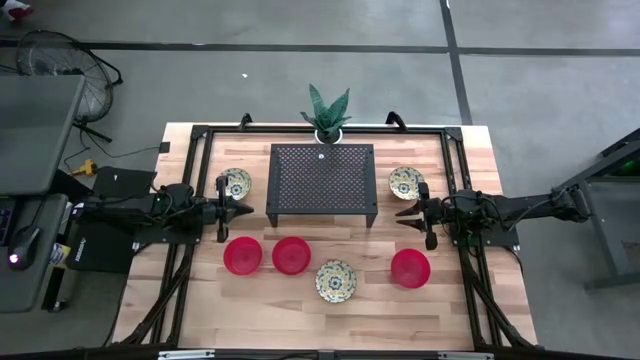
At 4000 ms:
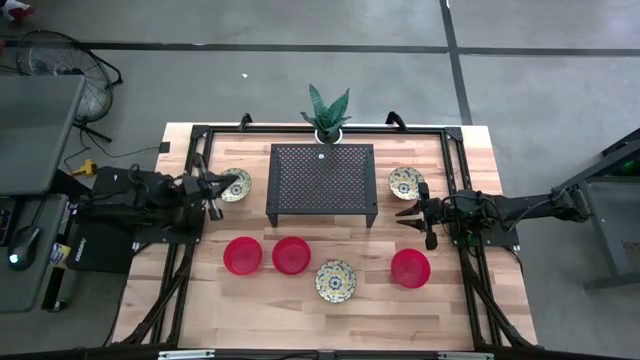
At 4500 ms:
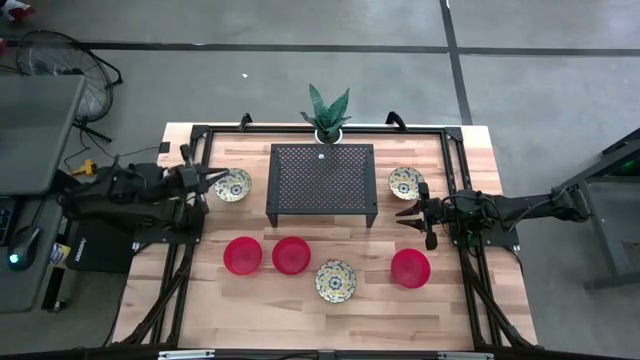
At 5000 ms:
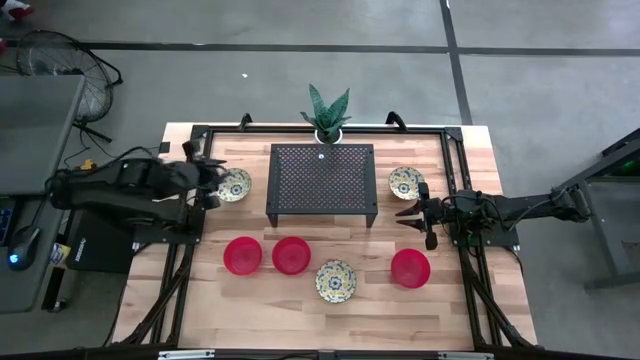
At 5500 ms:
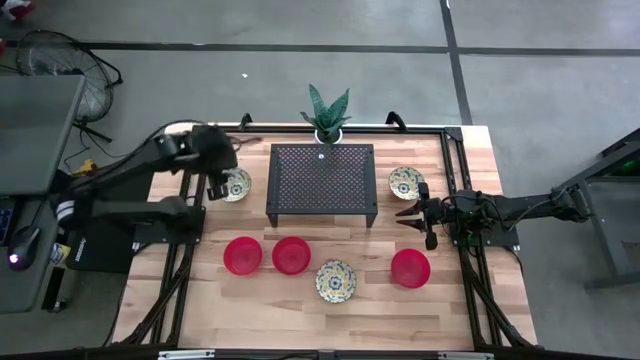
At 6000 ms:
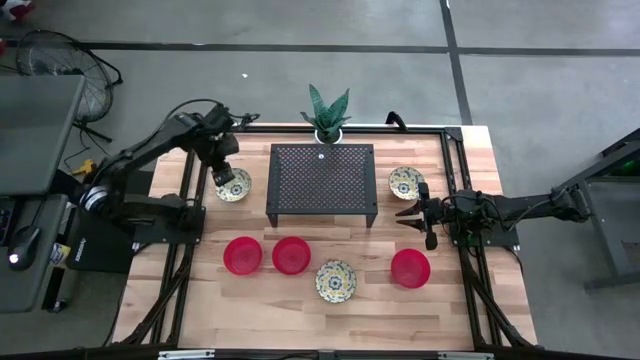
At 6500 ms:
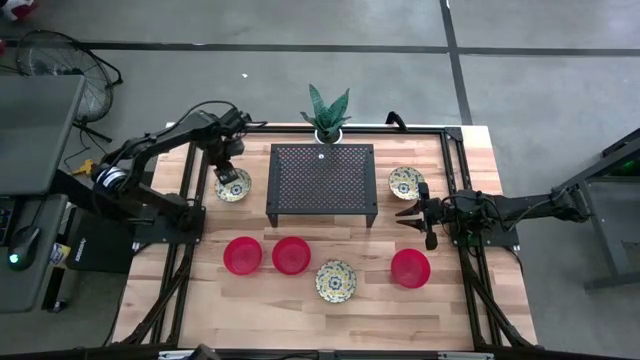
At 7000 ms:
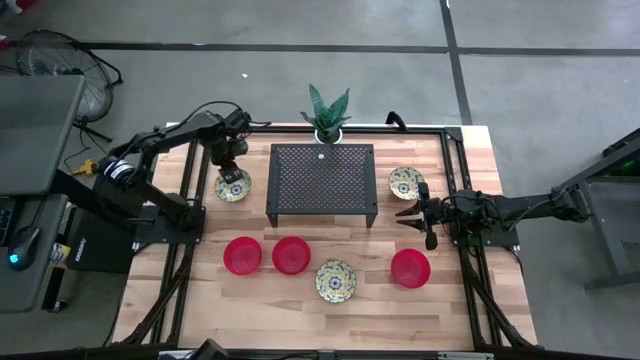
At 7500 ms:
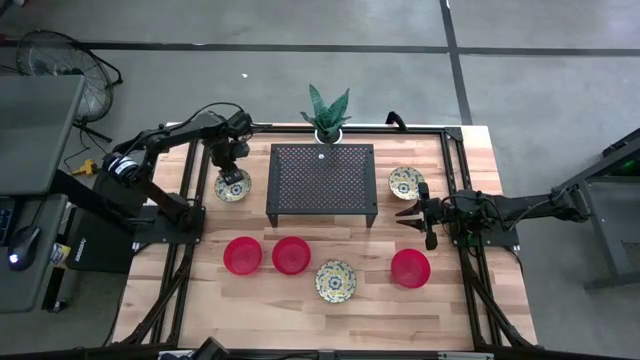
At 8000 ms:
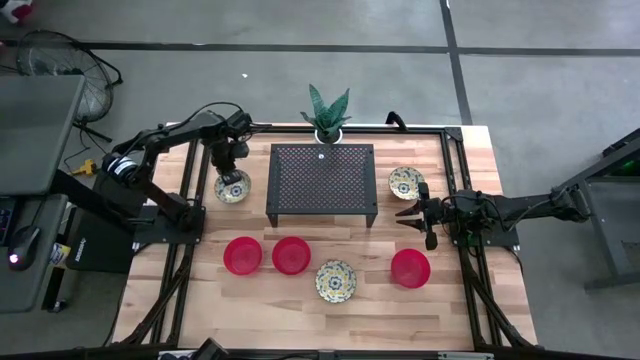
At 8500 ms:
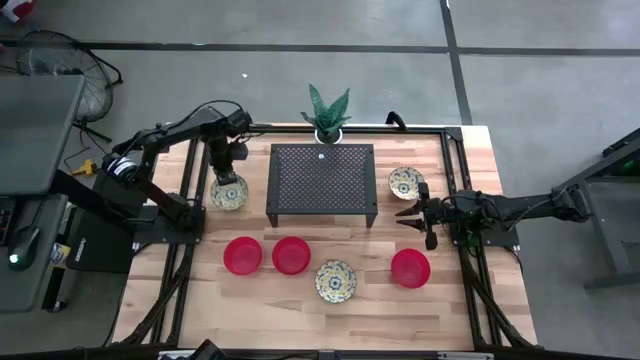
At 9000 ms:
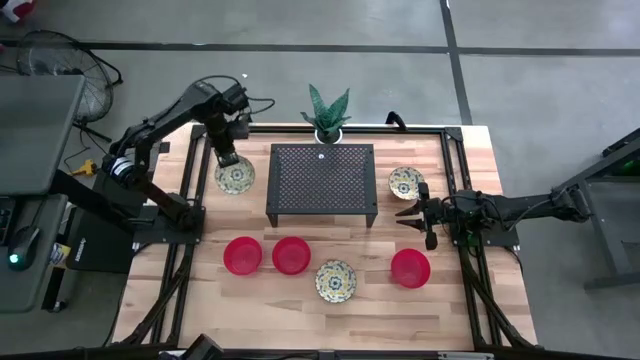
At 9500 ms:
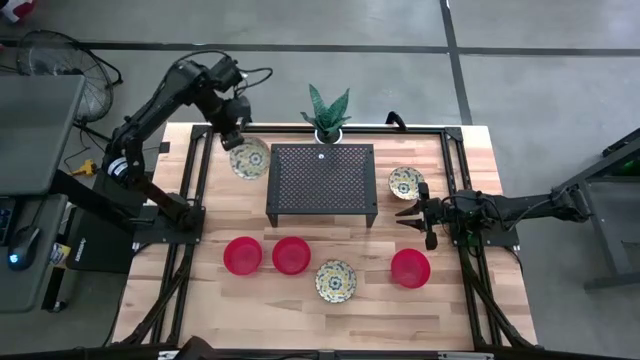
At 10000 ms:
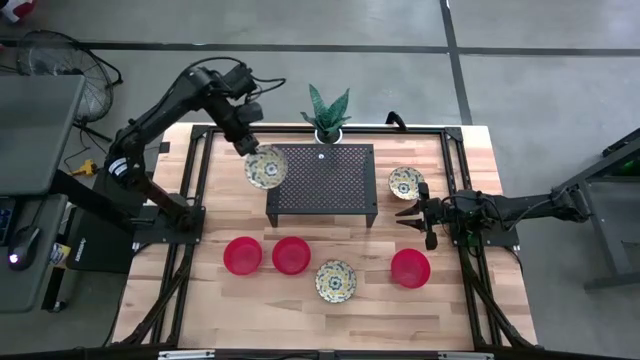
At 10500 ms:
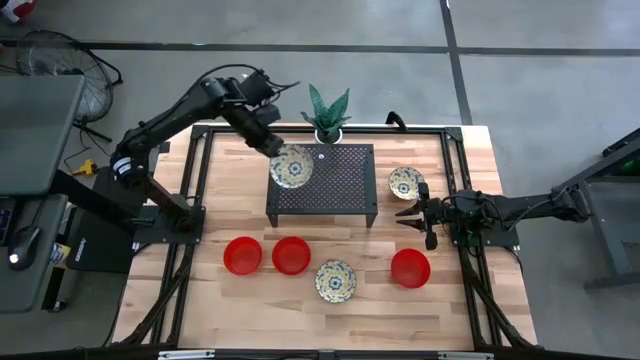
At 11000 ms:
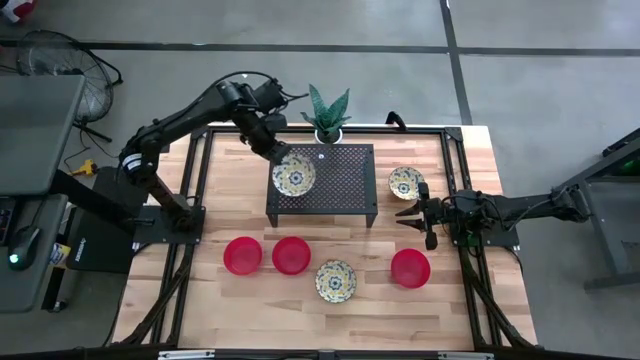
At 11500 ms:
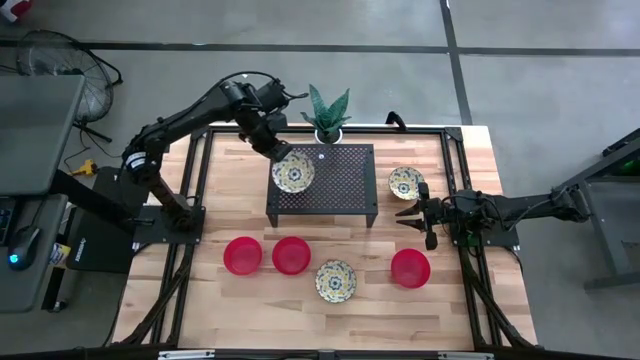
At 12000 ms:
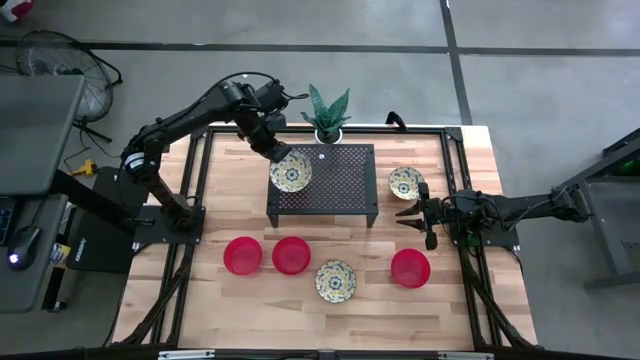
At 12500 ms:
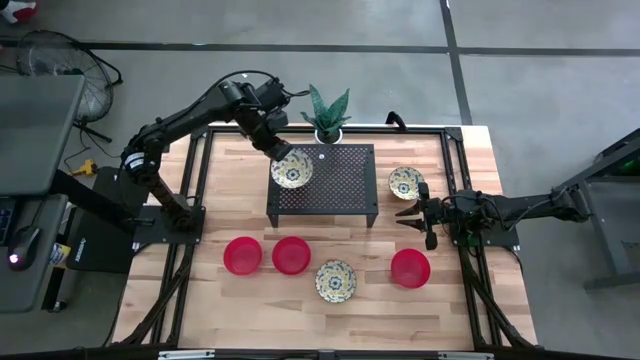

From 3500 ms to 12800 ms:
Task: Pick & Place Mini bowls
Put the top left yellow bowl on the shelf

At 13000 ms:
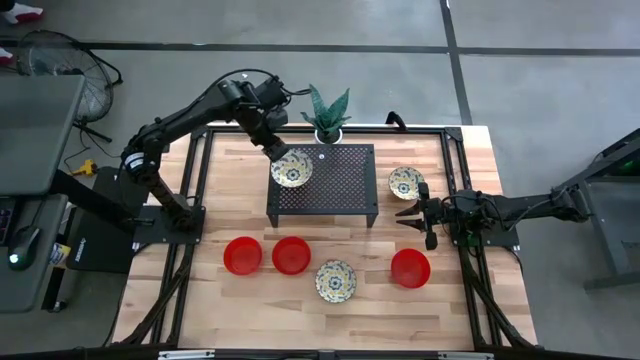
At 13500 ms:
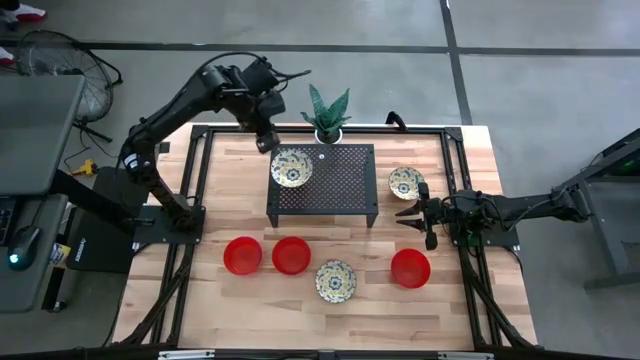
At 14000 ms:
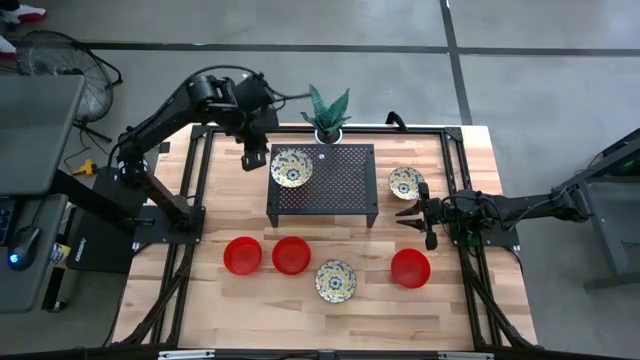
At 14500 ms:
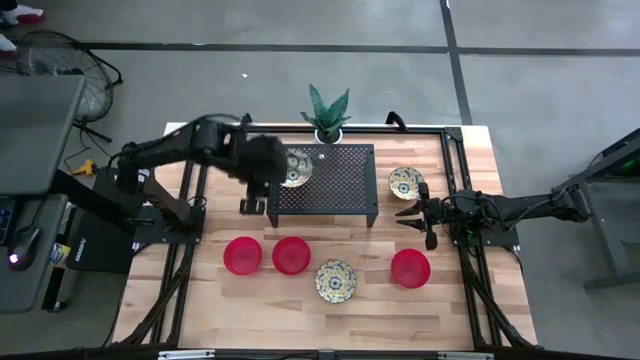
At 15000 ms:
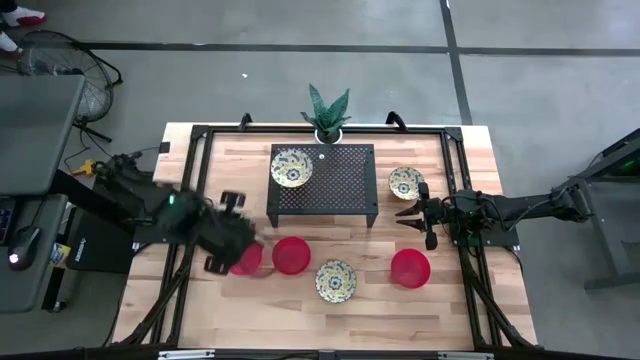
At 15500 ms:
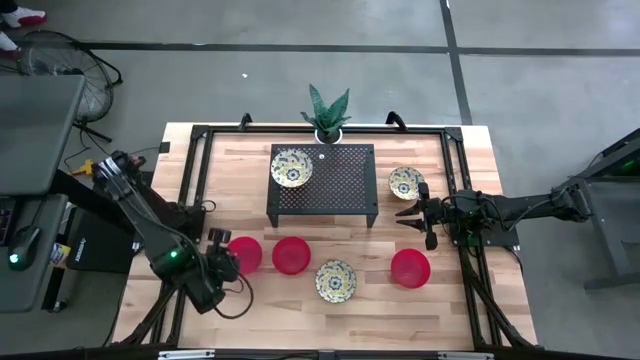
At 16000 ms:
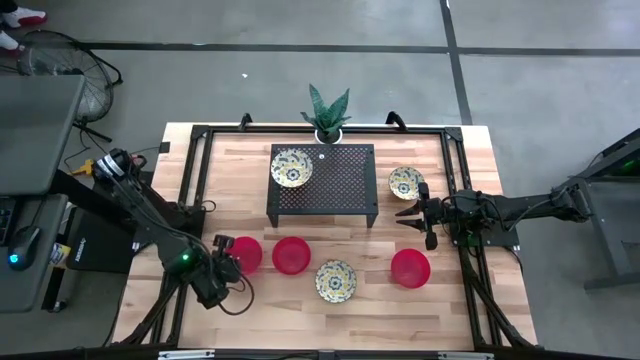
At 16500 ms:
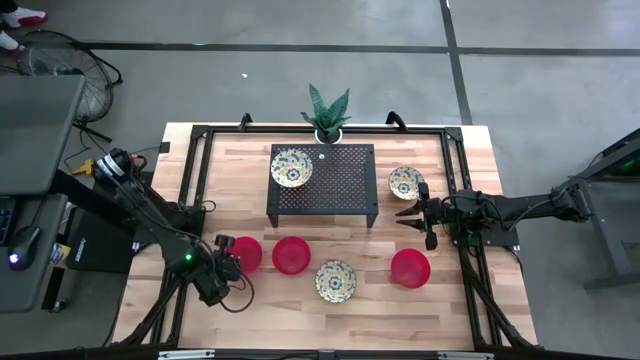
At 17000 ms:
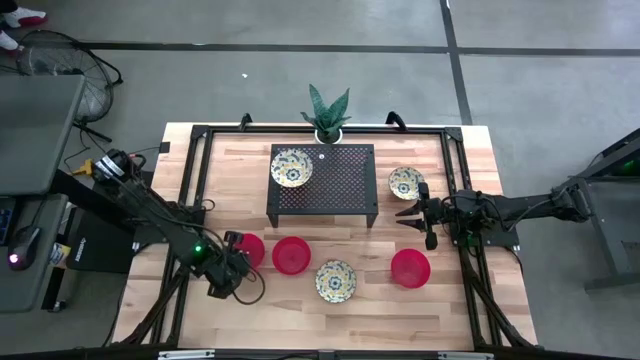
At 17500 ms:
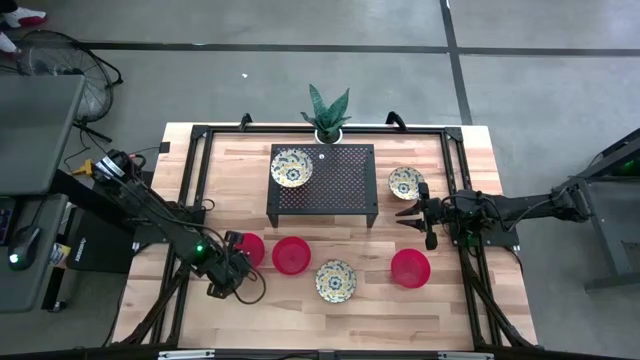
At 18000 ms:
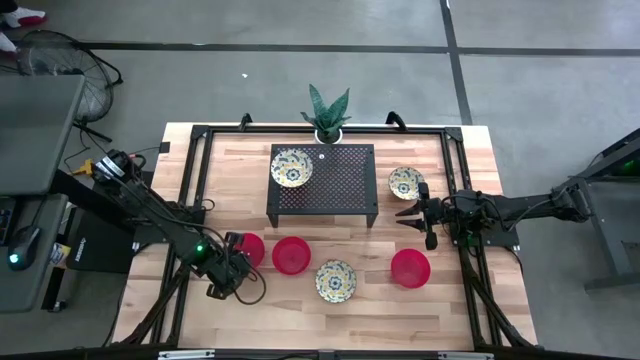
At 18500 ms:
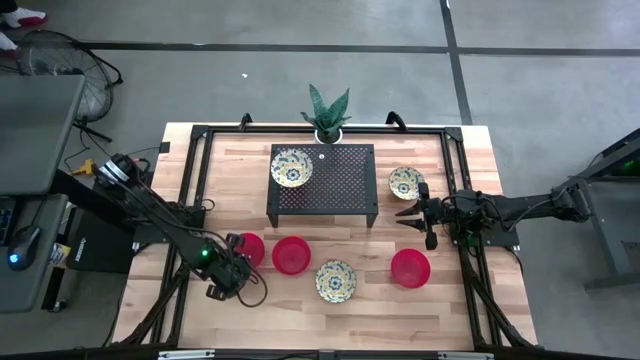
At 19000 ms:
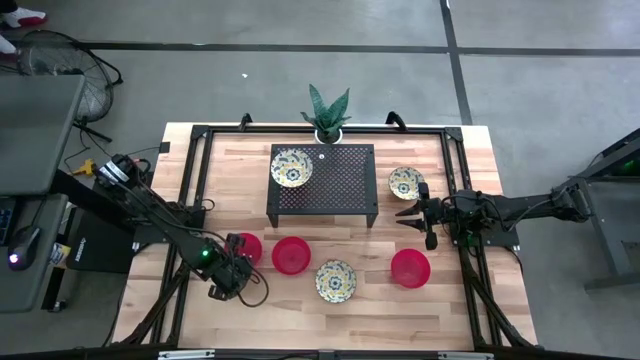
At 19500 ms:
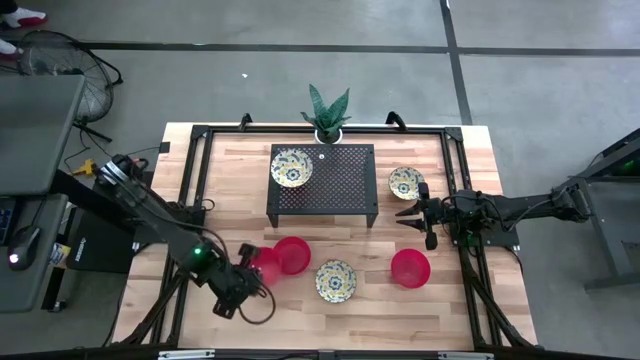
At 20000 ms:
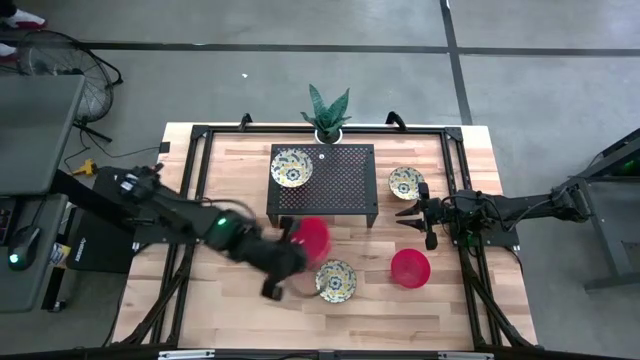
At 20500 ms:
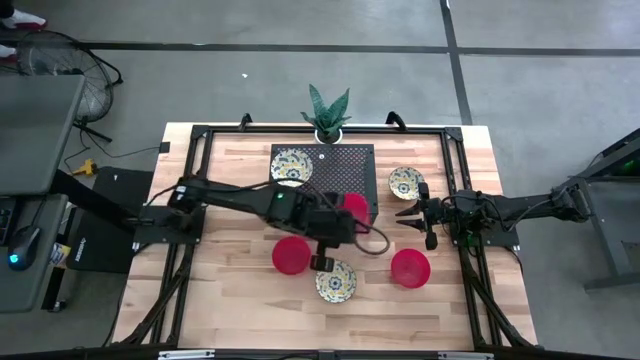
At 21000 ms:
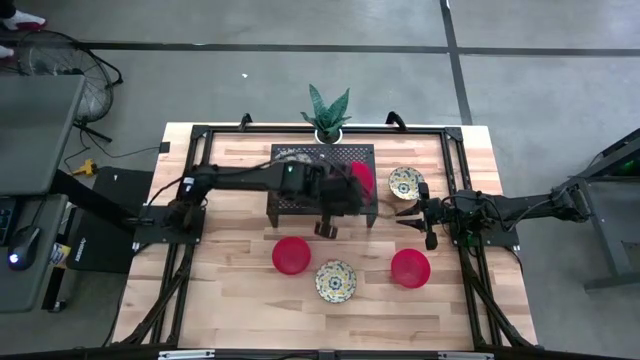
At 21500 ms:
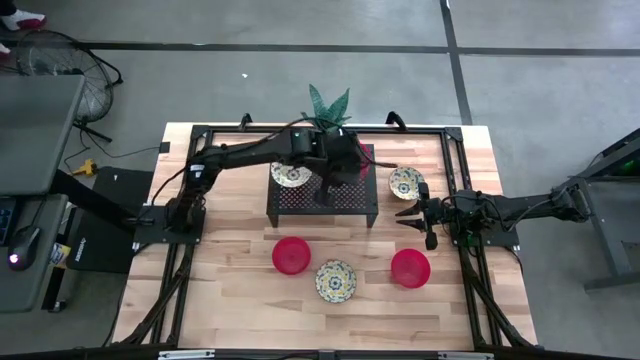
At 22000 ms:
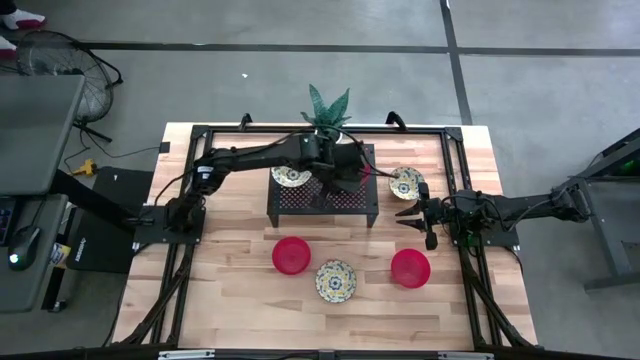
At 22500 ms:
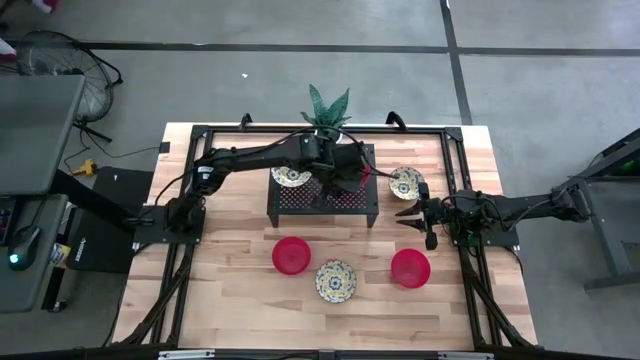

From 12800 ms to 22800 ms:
Put the left red bowl on the shelf

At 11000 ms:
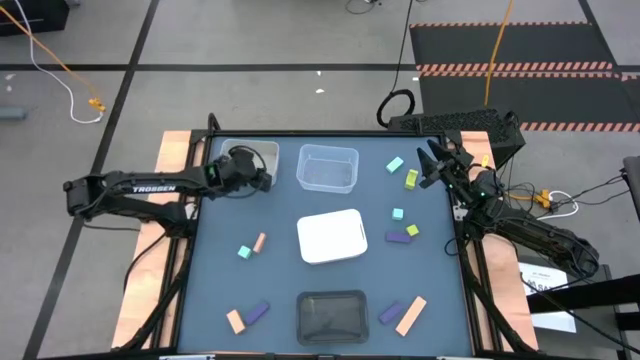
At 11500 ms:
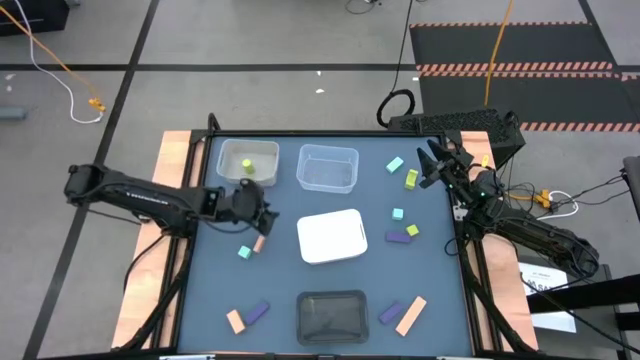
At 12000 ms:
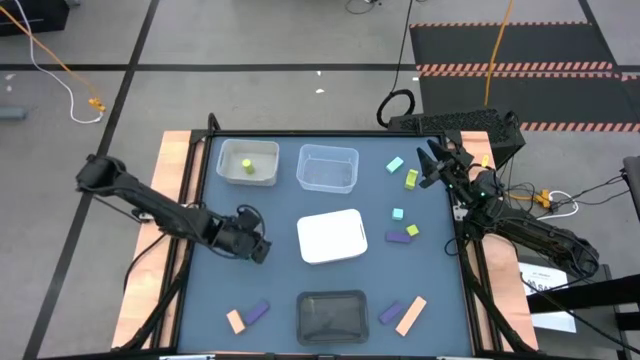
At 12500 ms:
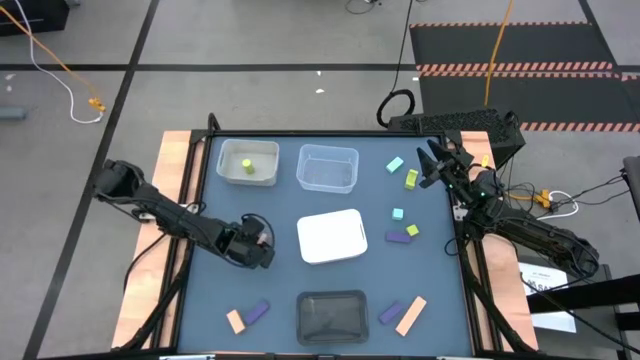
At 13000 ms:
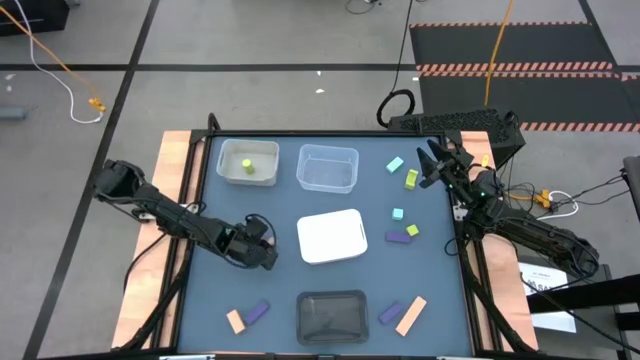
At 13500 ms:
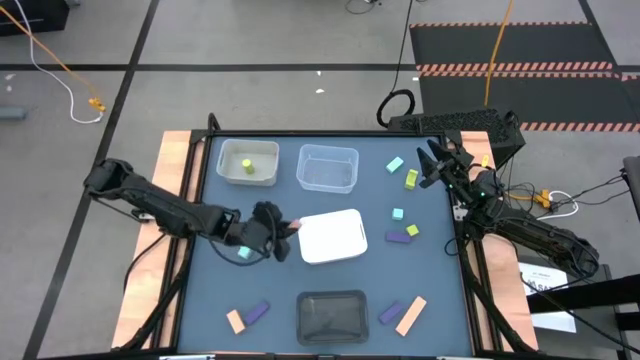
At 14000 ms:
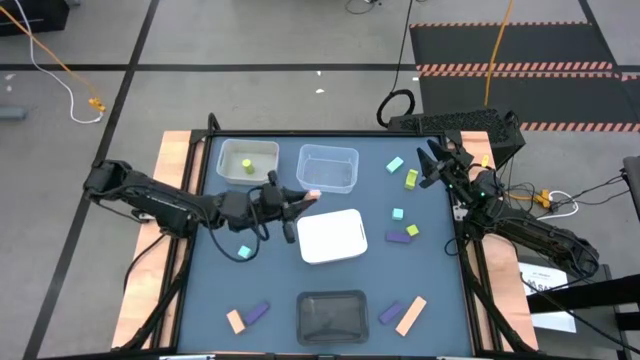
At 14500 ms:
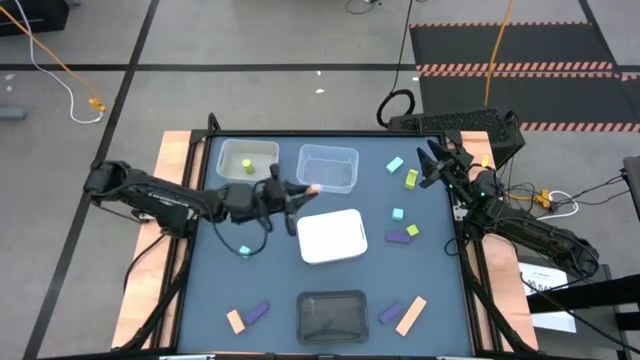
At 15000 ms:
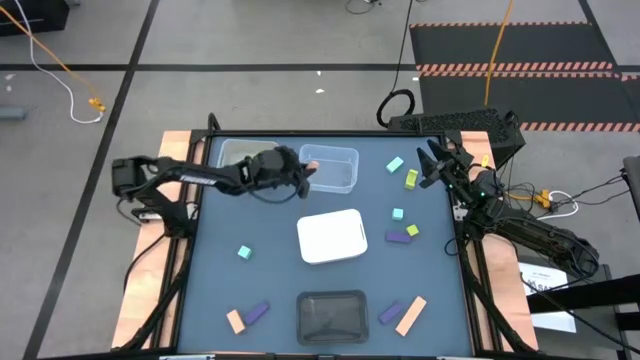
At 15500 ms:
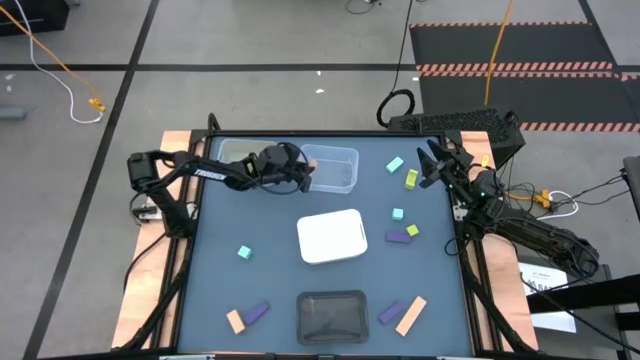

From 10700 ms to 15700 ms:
Task: Sort & place blocks by color
Put the top brown block into the transparent bin
